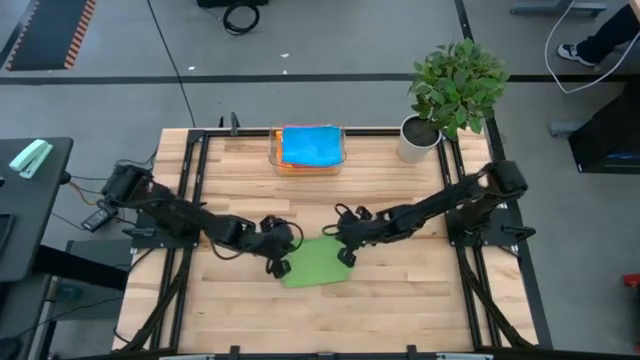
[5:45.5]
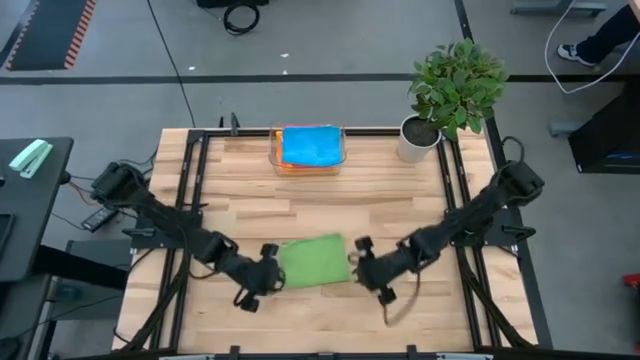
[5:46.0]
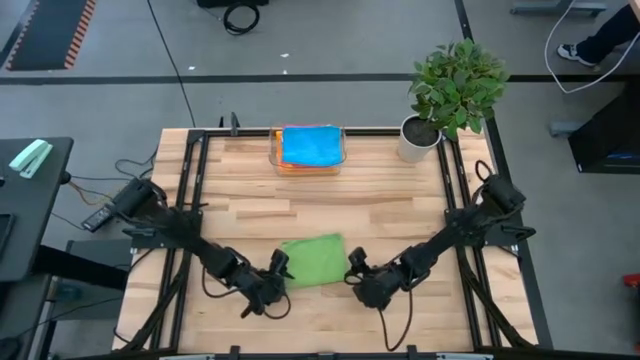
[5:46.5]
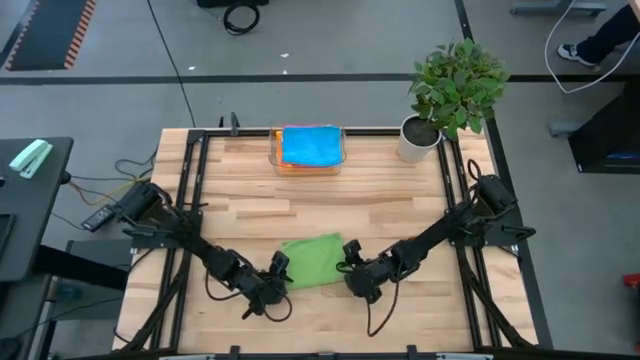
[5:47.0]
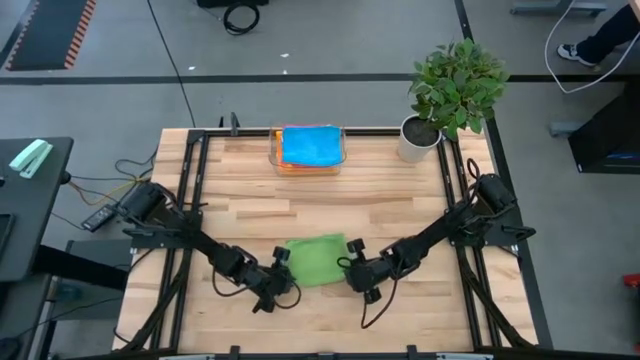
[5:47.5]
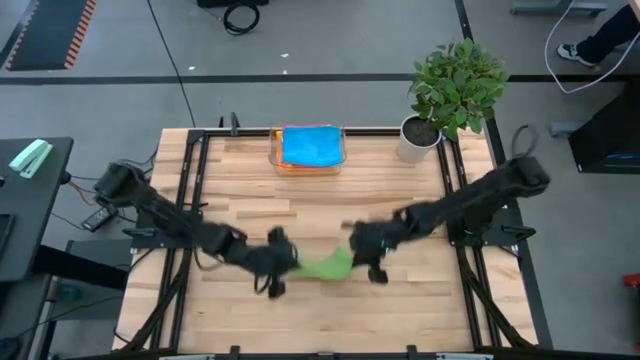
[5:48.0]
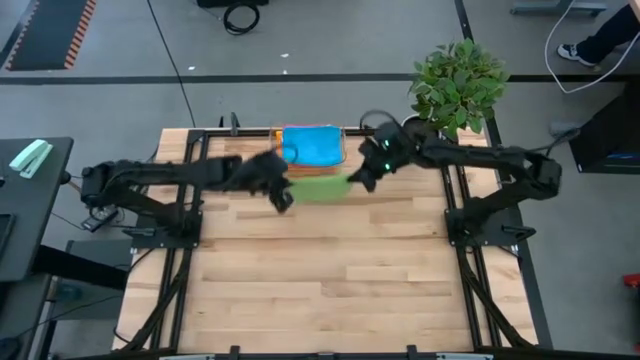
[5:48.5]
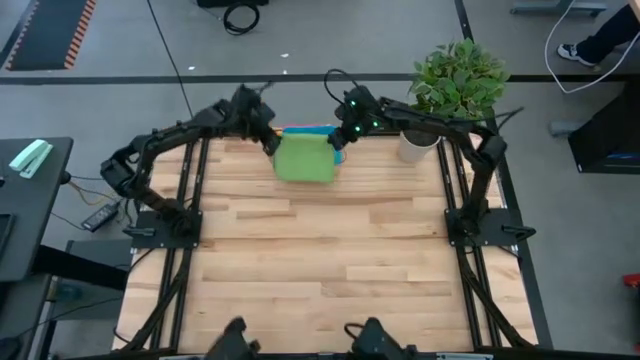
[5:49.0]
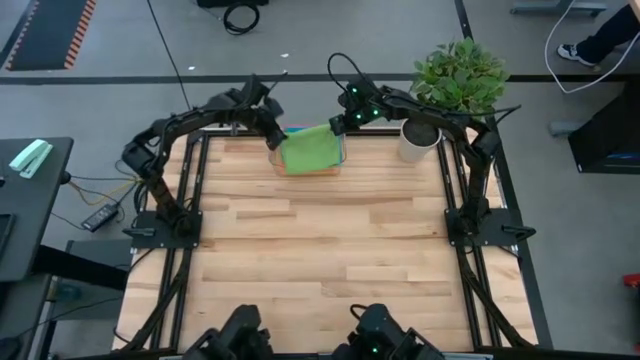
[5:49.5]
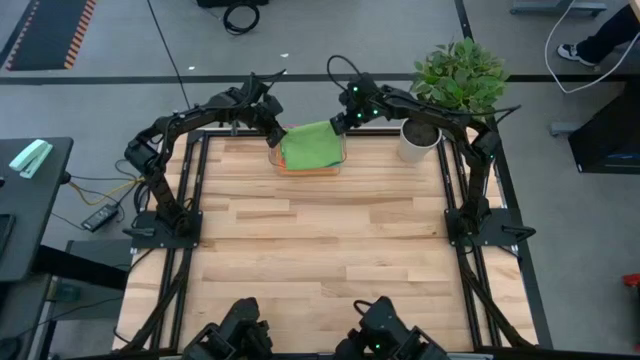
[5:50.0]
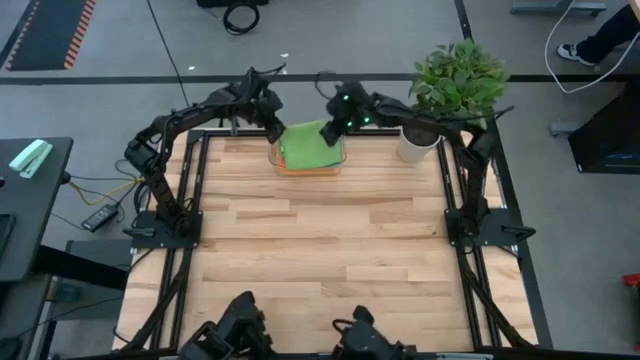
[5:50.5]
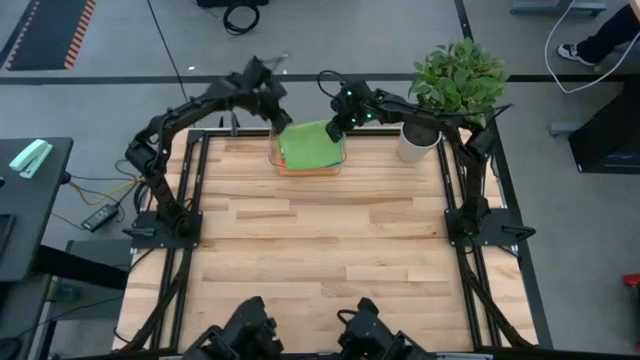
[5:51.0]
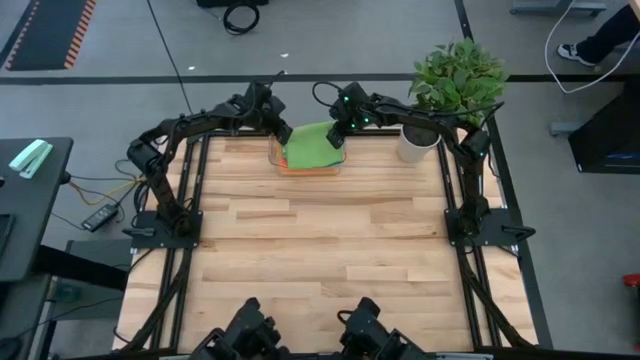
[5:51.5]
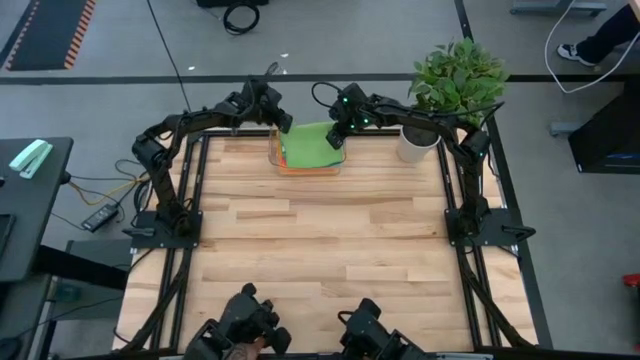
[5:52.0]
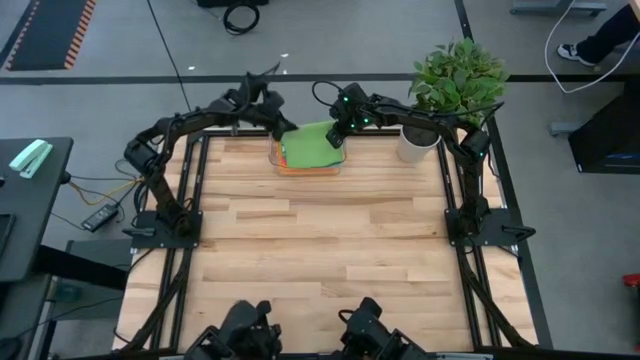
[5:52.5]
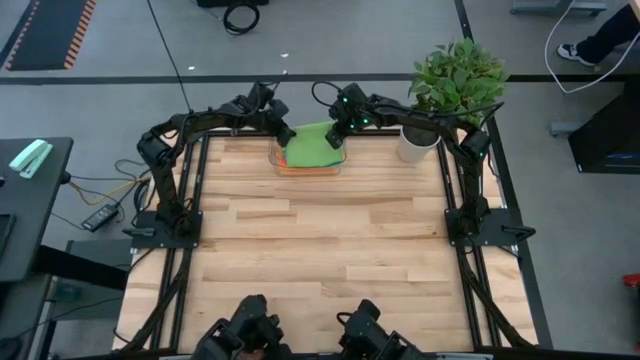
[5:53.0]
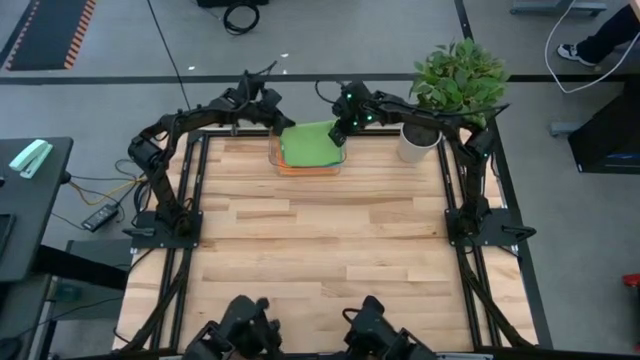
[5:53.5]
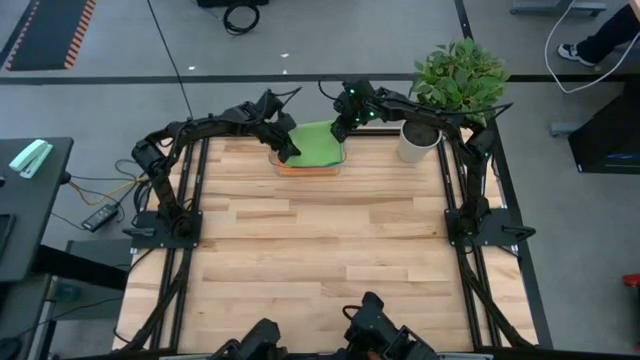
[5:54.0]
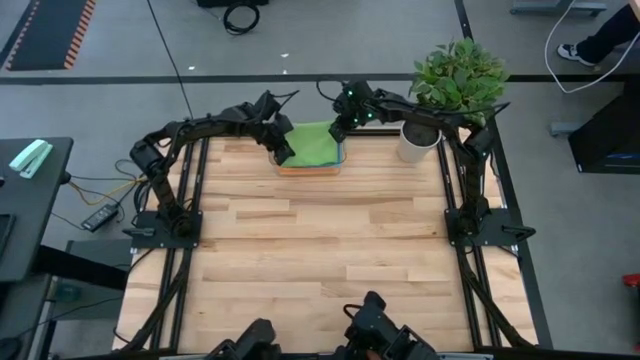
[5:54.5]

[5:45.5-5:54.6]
Task: Fold microfiber towels
Put the green microfiber towel into the transparent bin

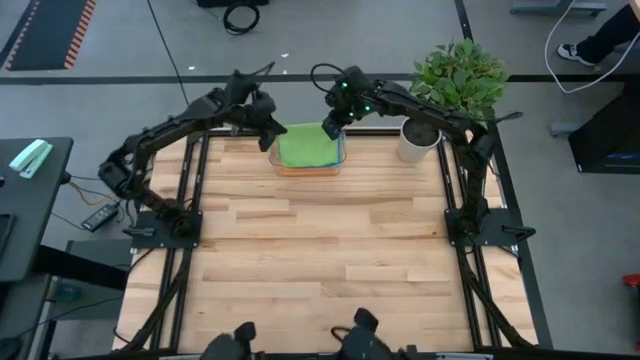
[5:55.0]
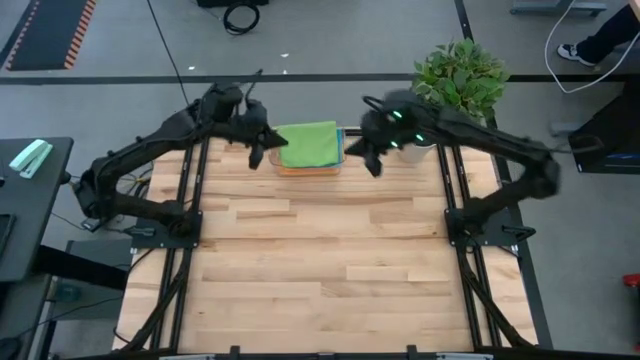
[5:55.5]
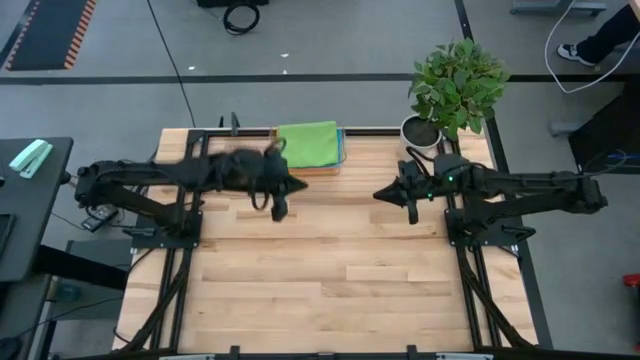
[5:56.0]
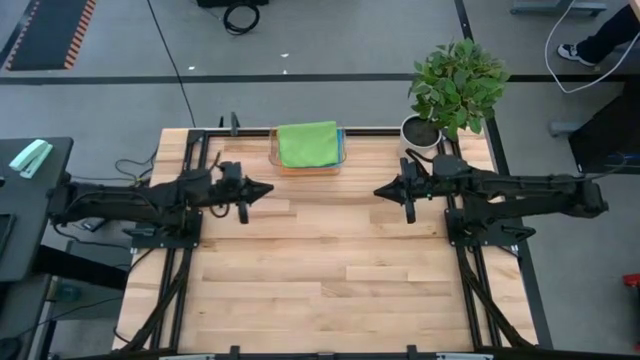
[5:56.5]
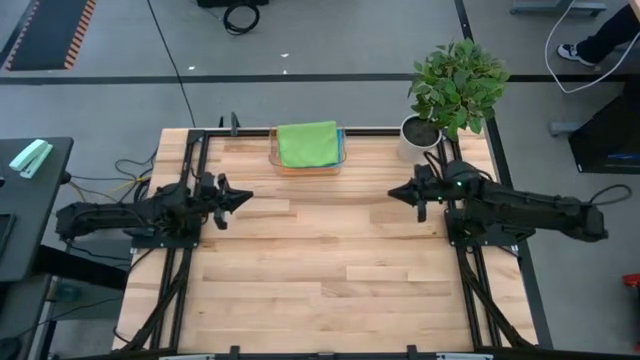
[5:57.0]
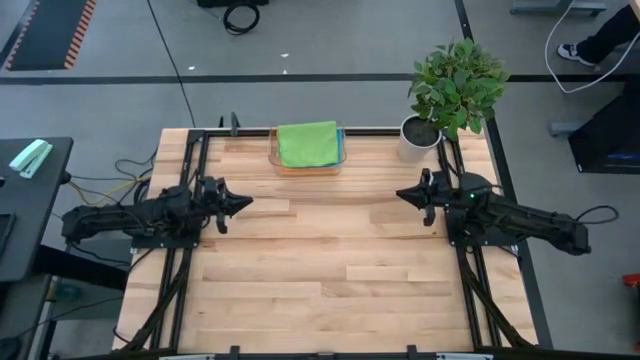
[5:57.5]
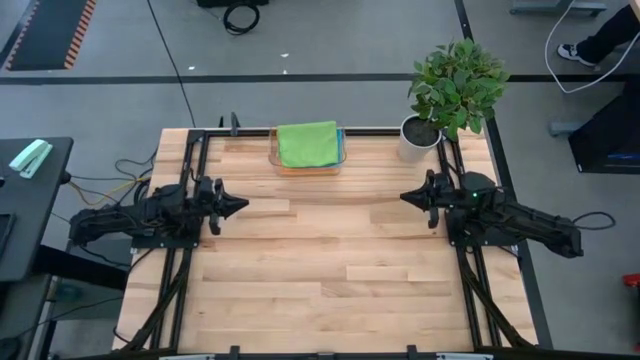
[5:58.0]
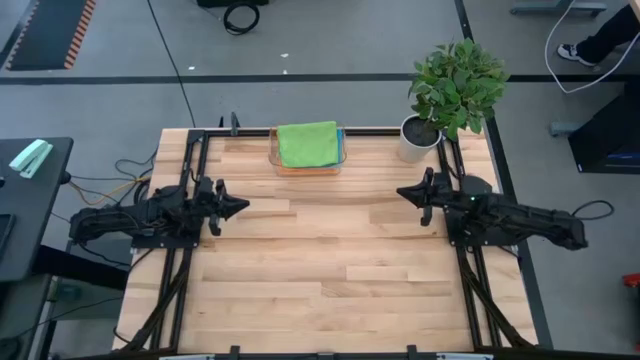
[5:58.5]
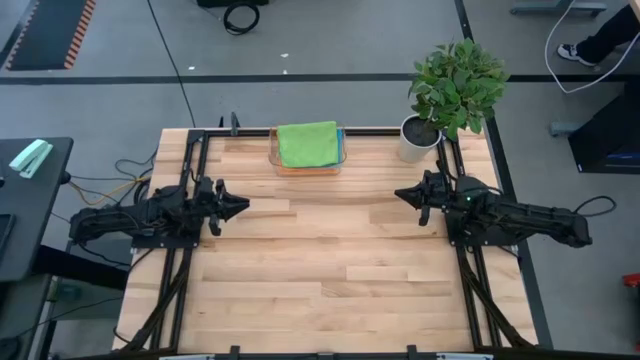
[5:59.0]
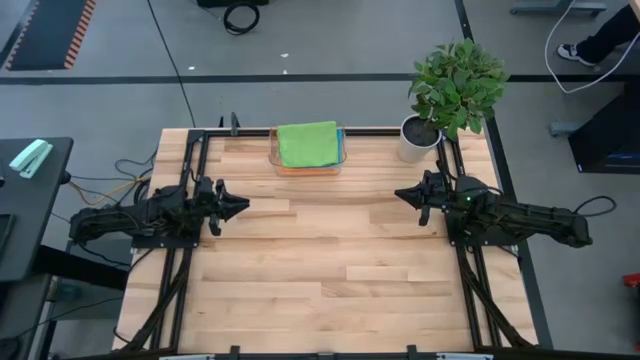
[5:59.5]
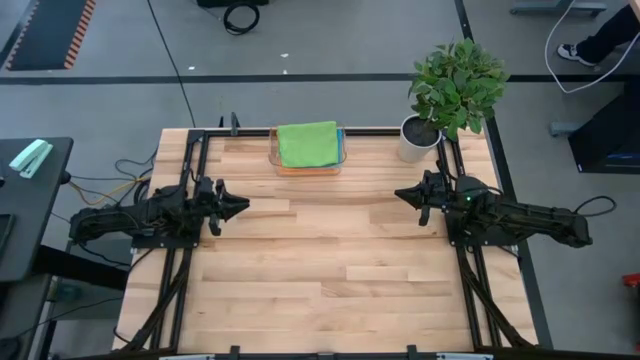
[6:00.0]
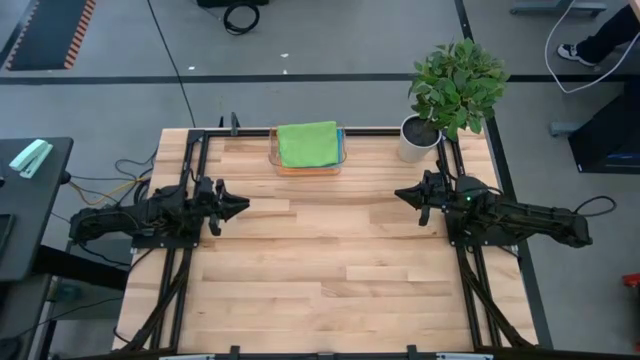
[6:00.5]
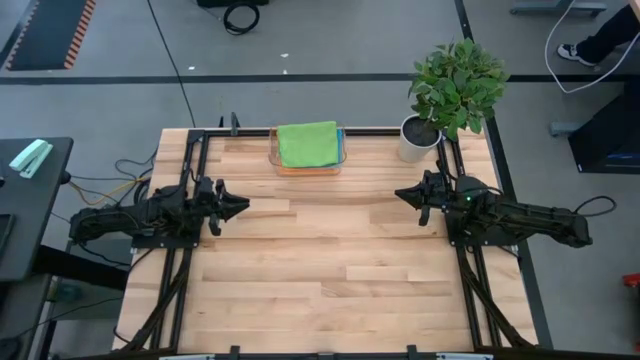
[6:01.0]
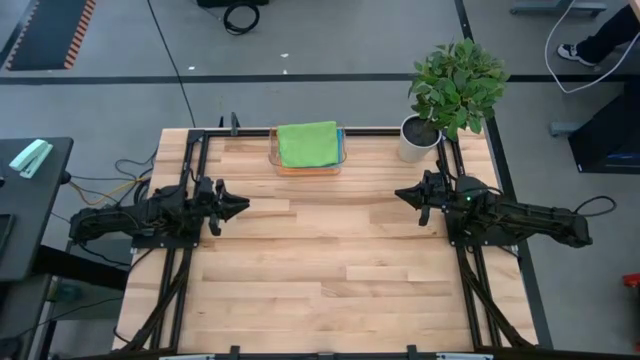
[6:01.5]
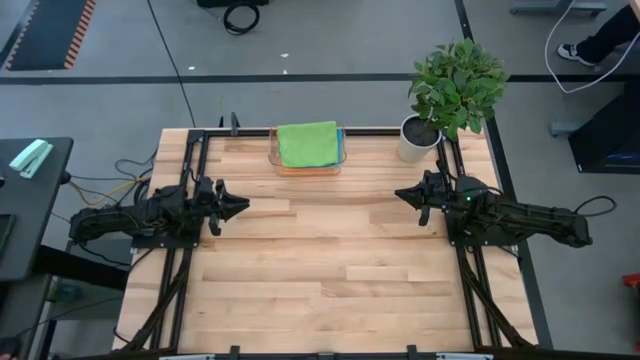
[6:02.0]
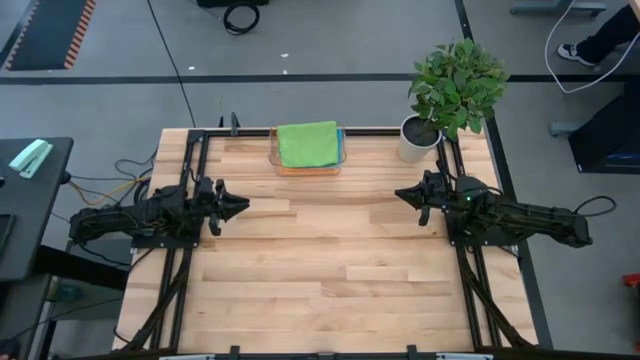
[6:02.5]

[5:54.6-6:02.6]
Return to Home Position

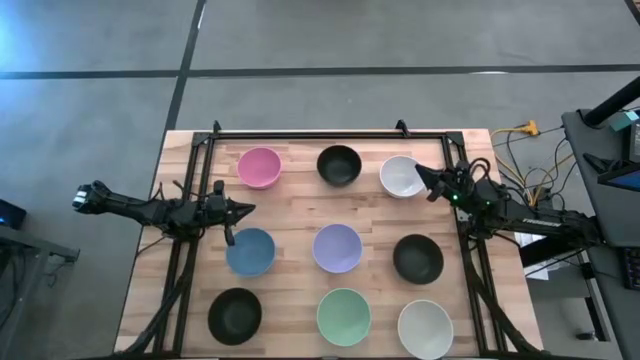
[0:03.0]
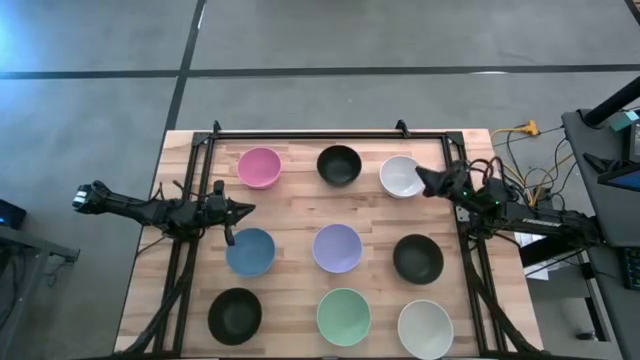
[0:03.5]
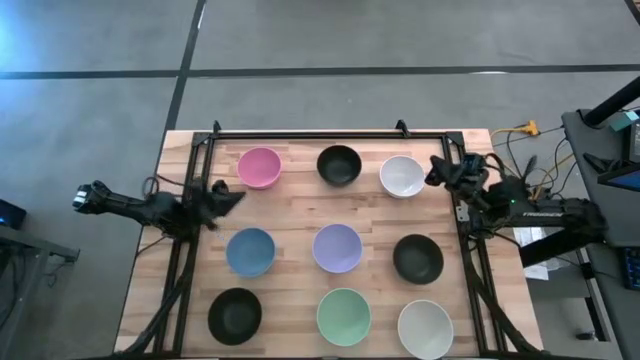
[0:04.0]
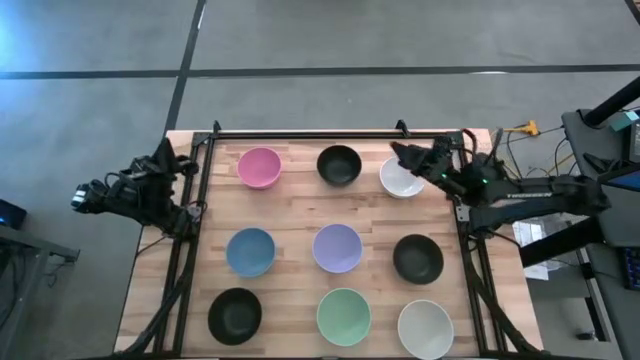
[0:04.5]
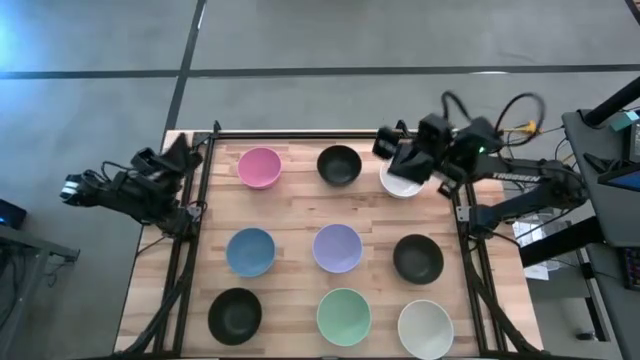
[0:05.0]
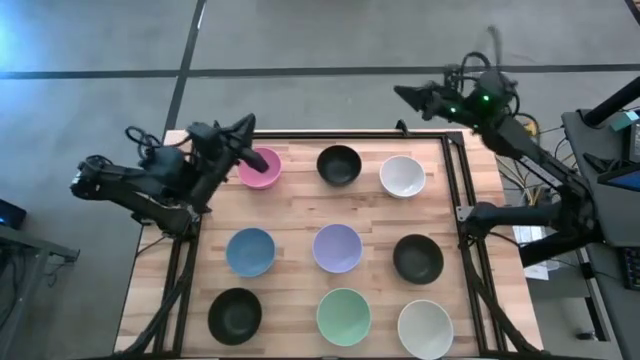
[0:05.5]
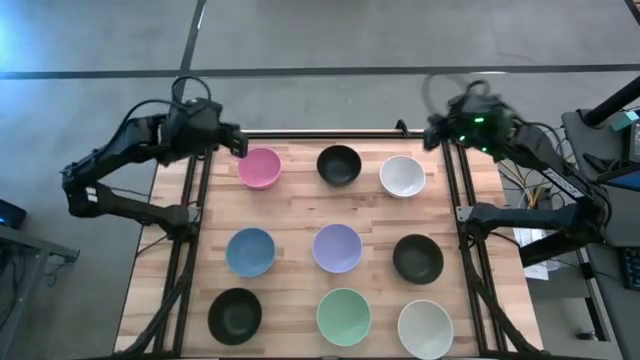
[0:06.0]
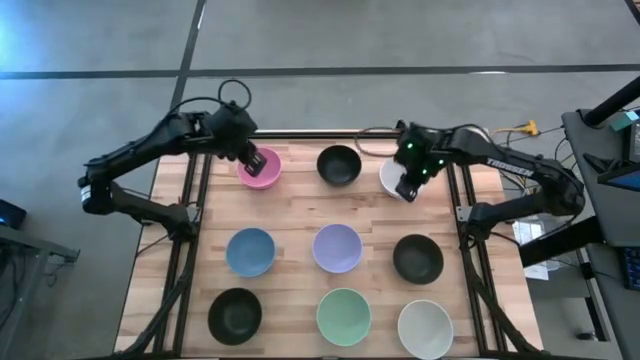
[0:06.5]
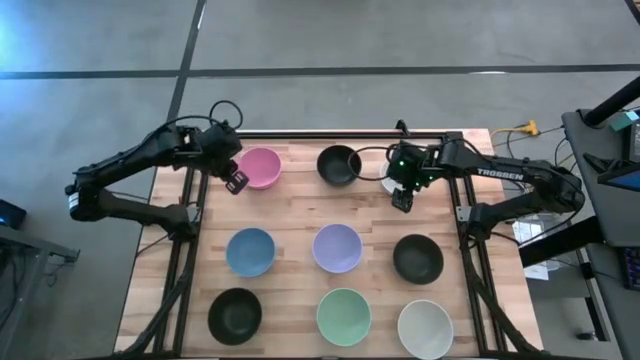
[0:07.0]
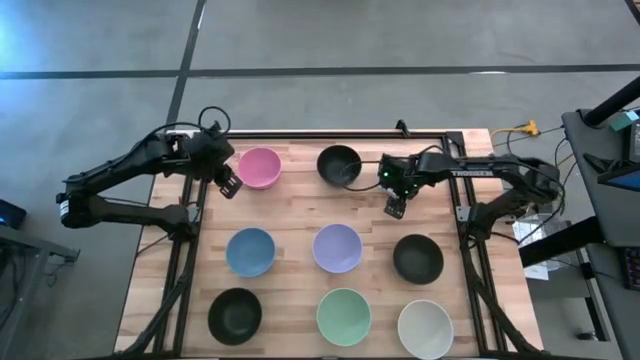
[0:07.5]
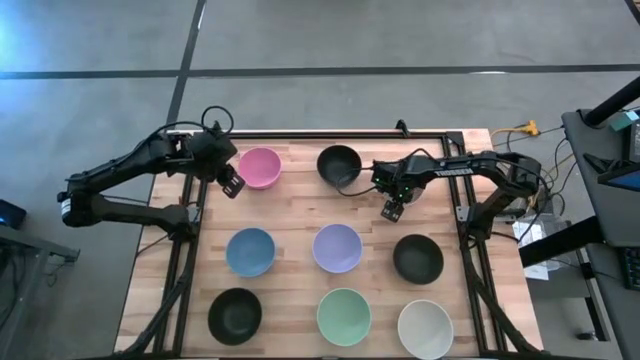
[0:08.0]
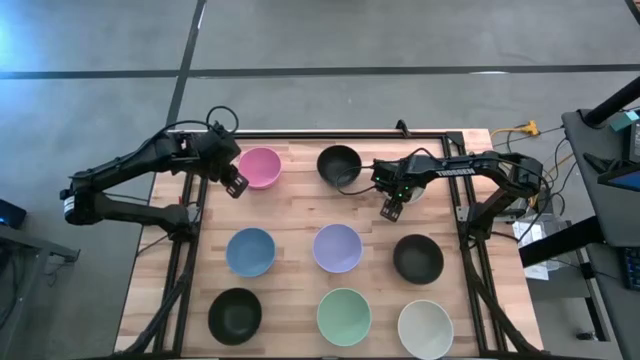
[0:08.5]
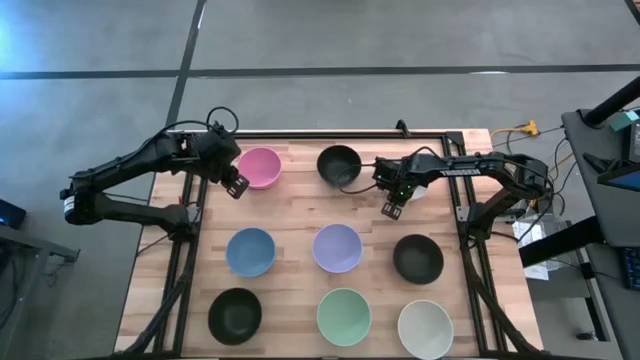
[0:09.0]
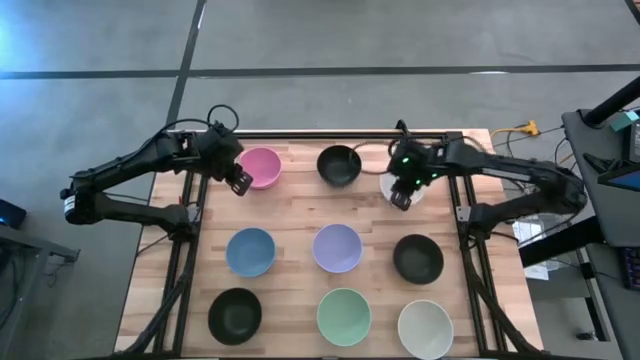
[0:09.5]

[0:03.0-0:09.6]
Task: Nest bowls inside each other
Stack the top white bowl on top of the purple bowl
